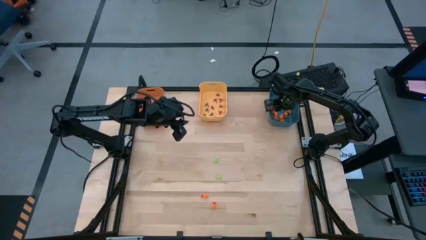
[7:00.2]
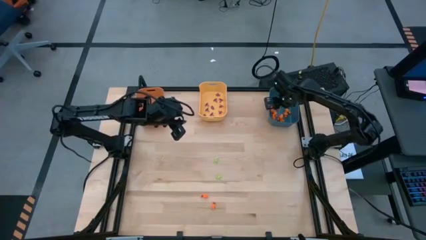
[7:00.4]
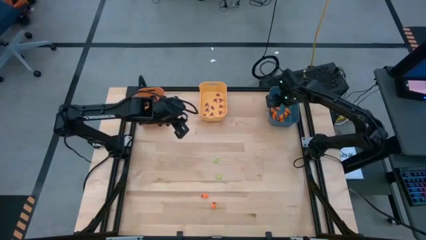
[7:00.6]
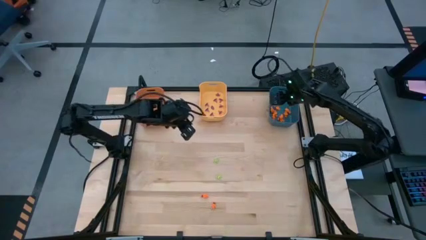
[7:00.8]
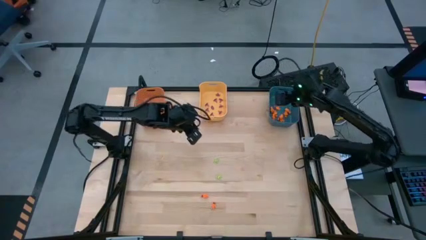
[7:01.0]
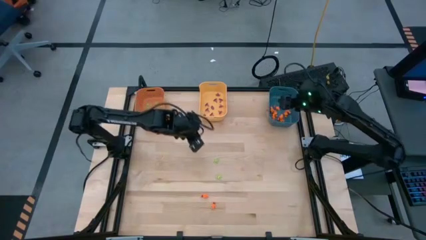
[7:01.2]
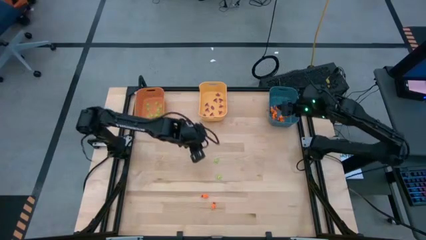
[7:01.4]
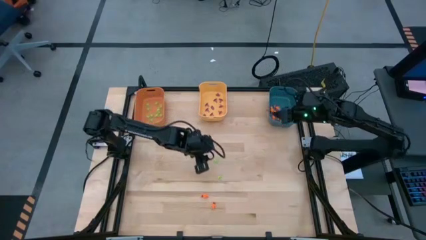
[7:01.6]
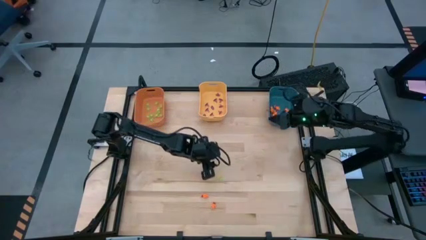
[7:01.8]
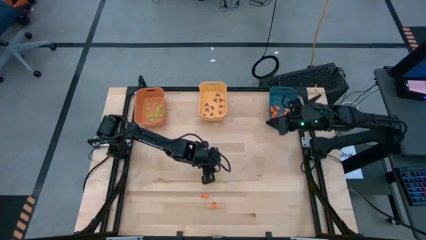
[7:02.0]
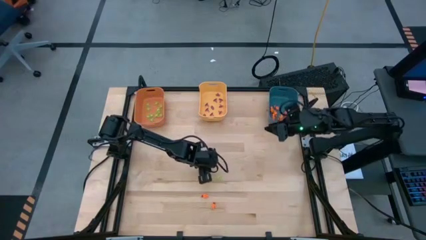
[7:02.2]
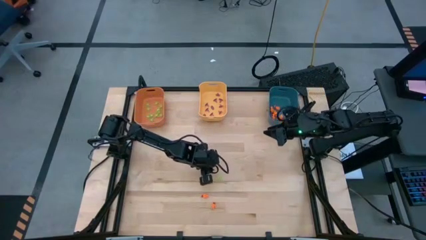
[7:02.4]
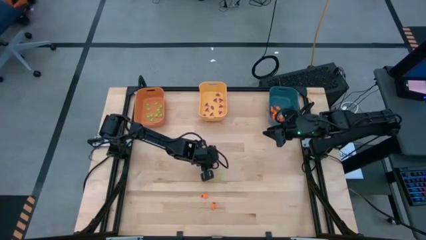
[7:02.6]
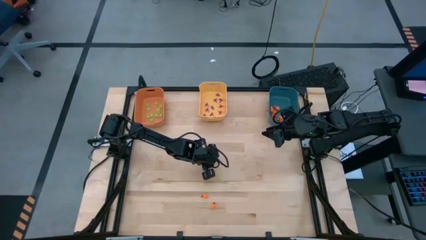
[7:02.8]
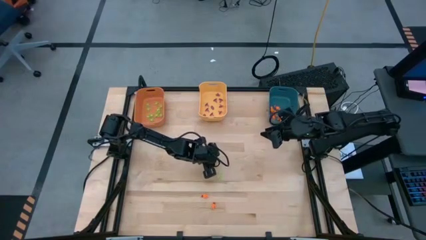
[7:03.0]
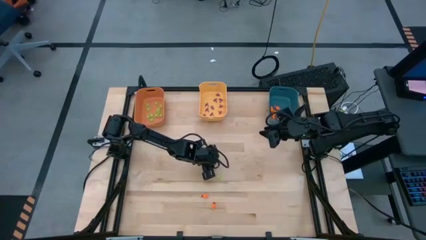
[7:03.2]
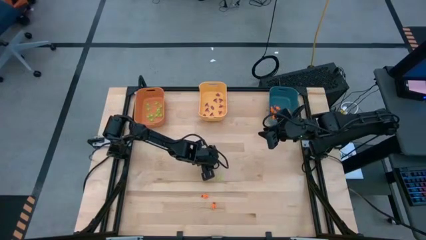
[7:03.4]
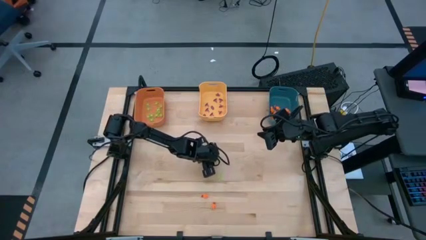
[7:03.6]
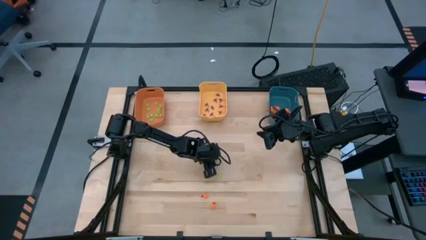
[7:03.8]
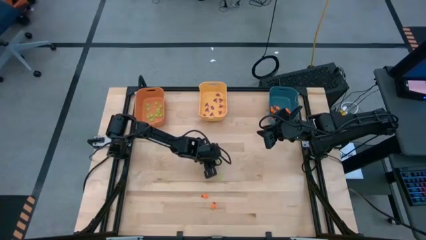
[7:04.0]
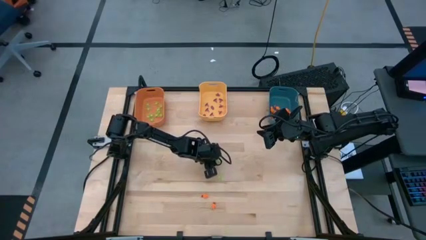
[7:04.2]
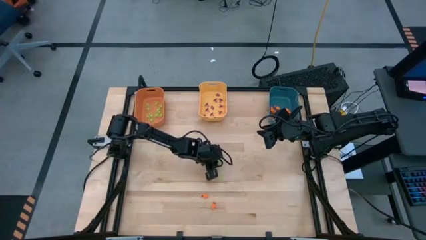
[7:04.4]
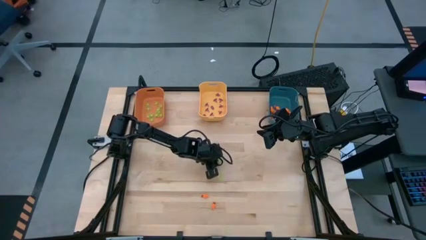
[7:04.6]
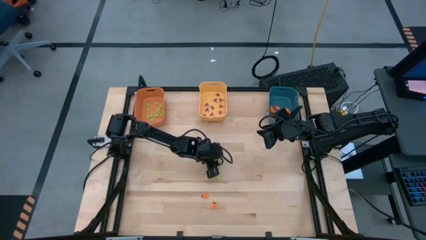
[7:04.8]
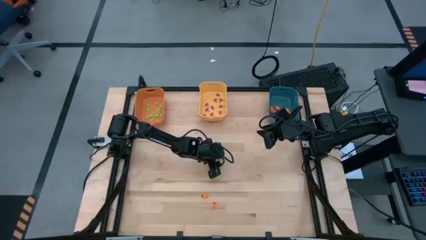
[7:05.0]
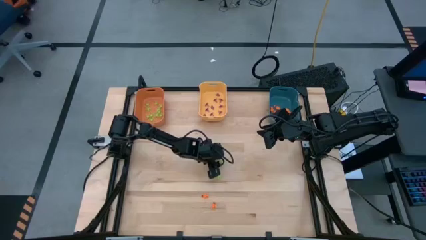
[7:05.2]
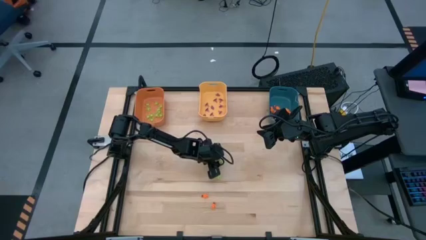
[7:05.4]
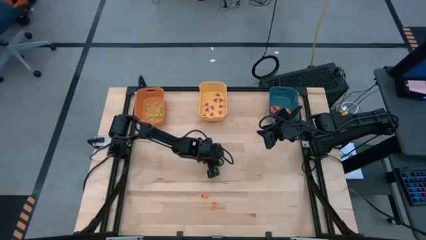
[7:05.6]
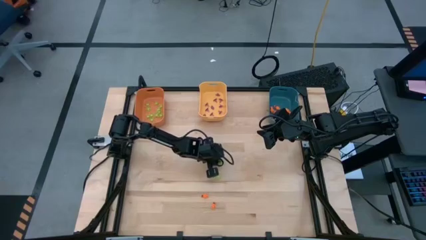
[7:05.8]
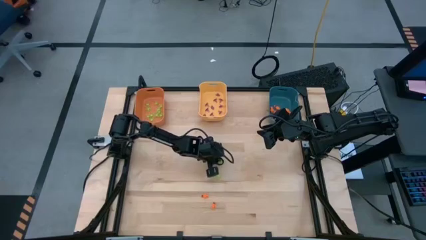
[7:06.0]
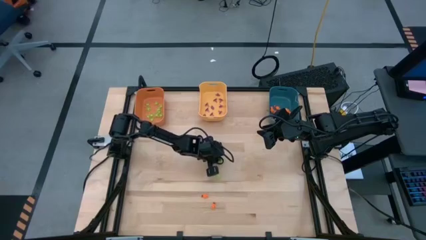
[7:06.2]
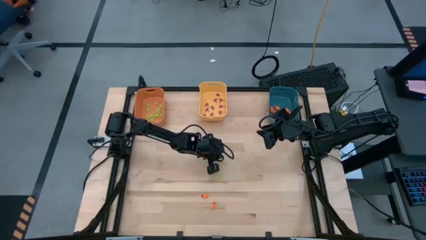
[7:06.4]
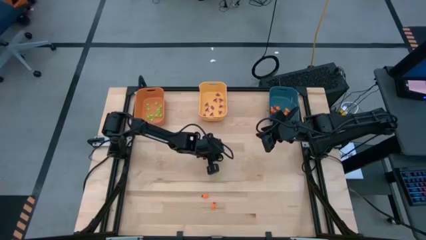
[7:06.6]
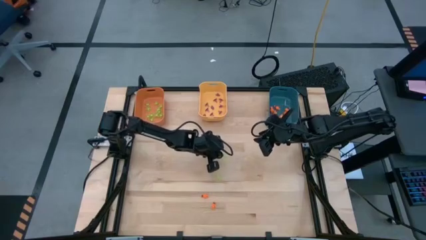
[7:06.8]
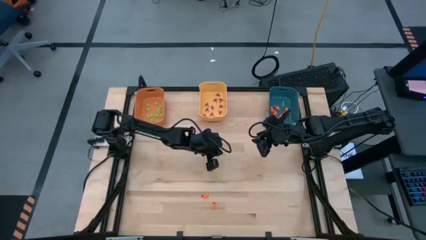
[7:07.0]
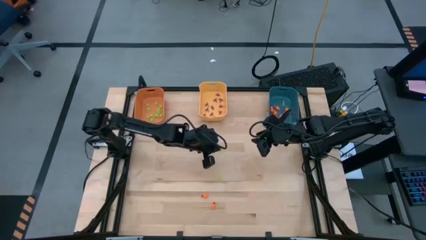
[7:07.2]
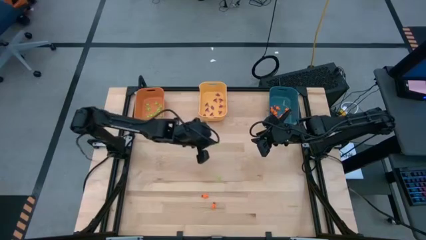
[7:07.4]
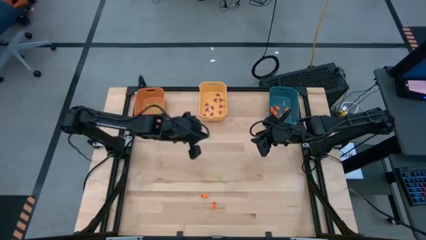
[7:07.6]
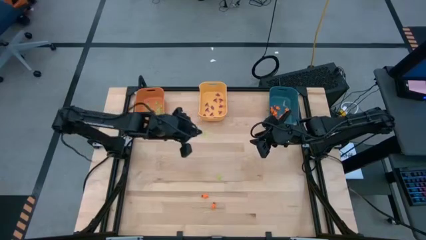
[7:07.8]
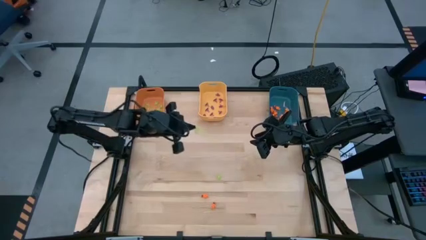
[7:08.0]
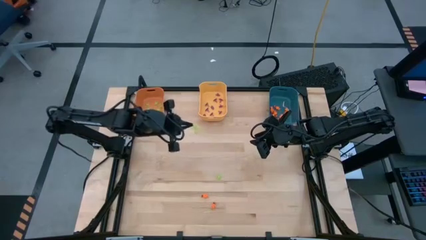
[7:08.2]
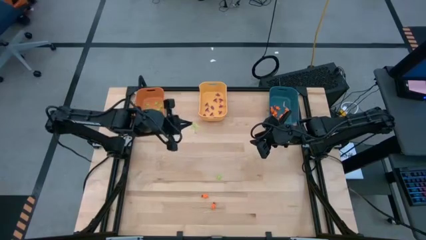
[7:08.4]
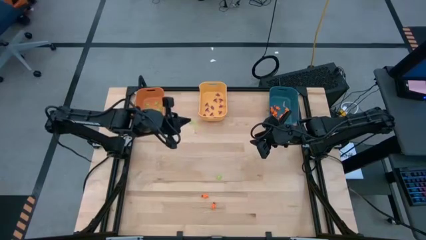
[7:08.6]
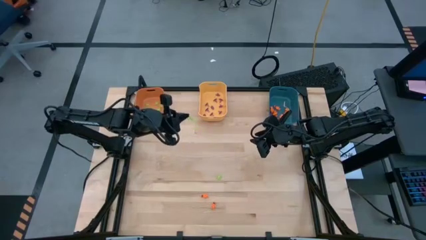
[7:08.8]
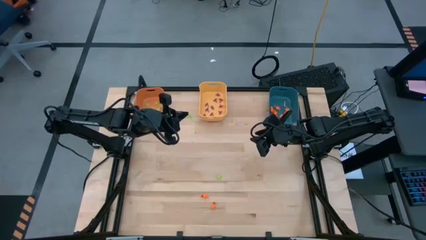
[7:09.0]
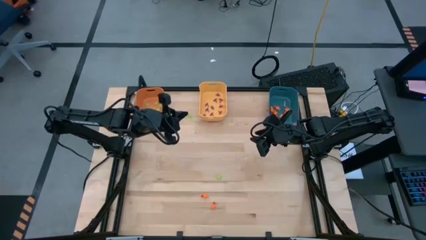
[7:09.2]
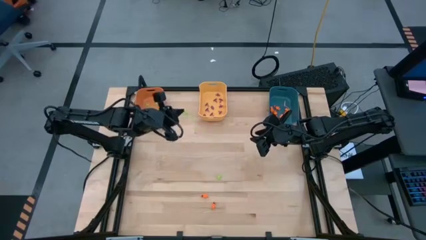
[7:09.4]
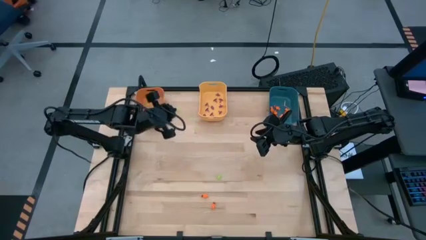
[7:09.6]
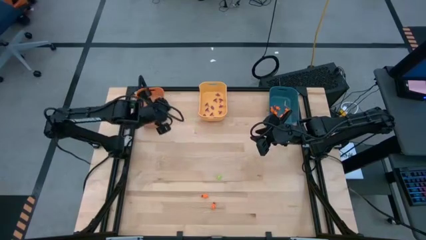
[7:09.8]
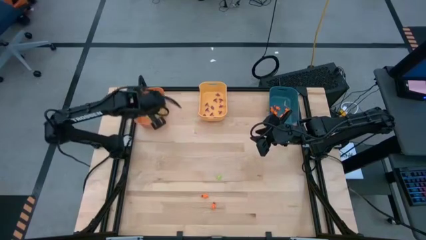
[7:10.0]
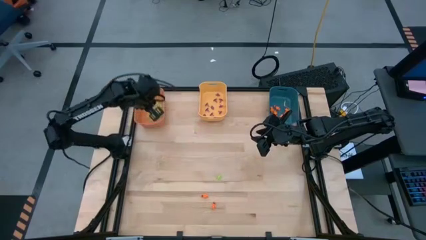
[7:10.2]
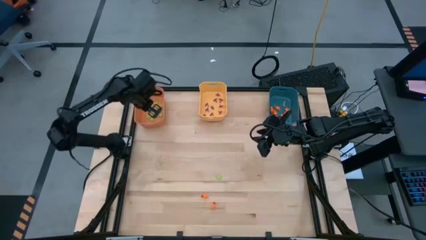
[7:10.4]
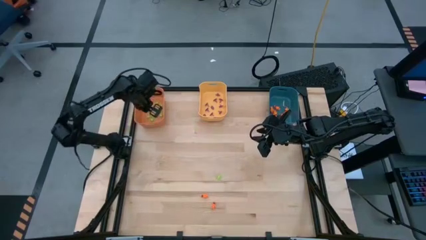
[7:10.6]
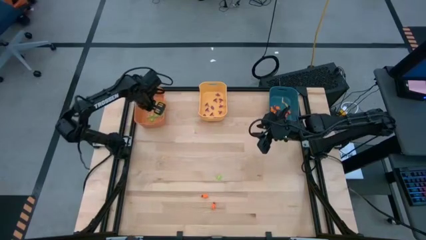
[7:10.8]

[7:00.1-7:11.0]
Task: Sort Halloween decoration
Put the green spider toy into the orange bin

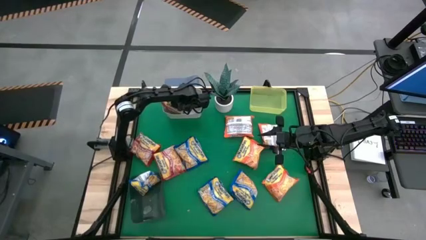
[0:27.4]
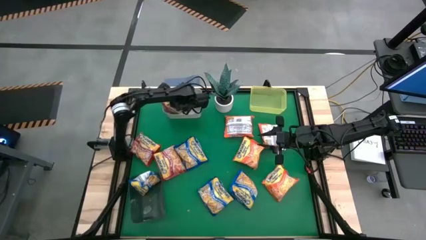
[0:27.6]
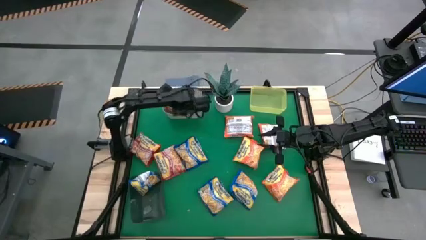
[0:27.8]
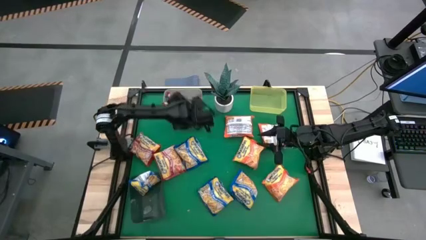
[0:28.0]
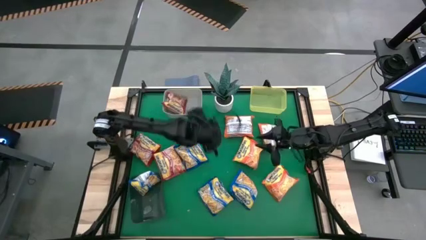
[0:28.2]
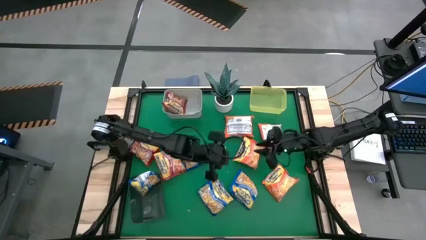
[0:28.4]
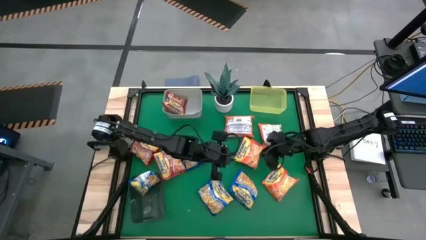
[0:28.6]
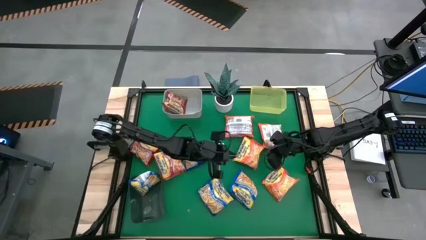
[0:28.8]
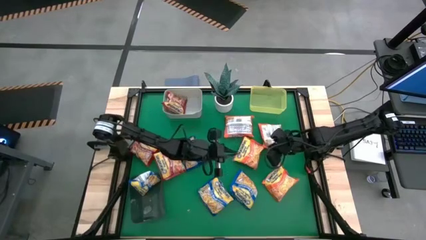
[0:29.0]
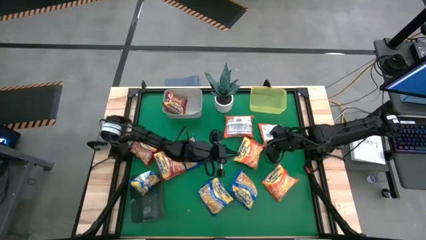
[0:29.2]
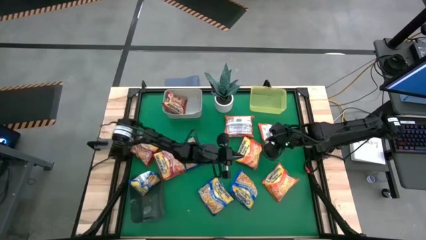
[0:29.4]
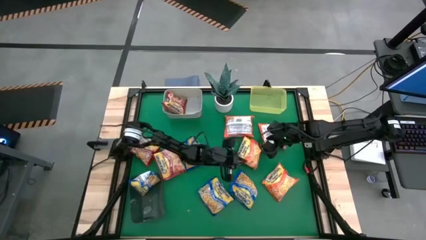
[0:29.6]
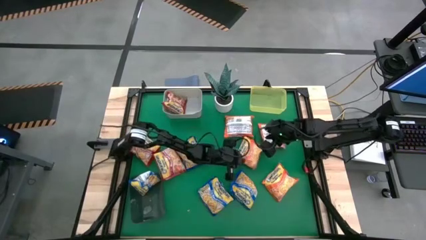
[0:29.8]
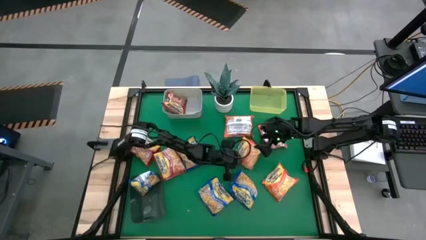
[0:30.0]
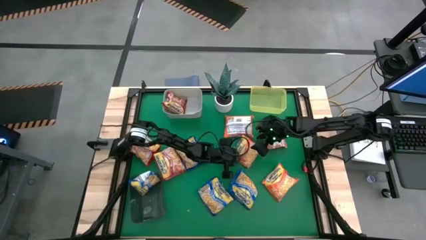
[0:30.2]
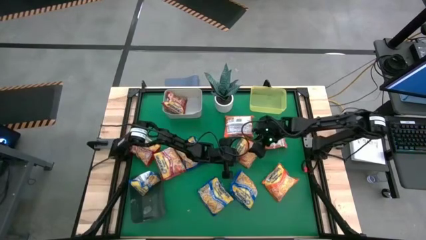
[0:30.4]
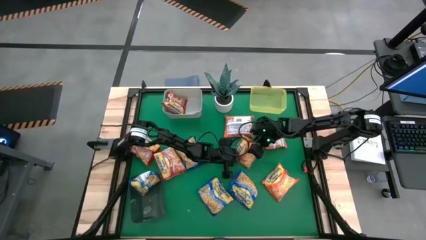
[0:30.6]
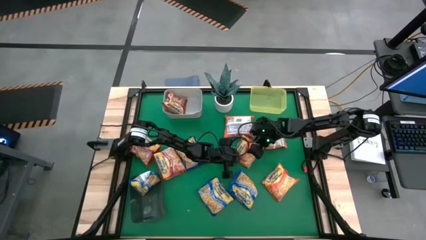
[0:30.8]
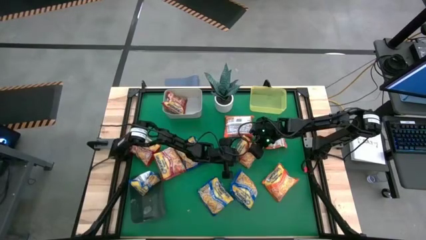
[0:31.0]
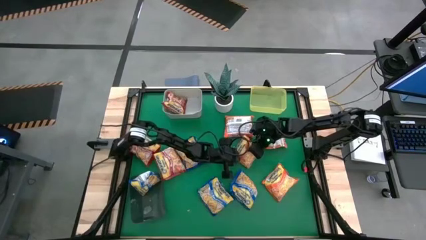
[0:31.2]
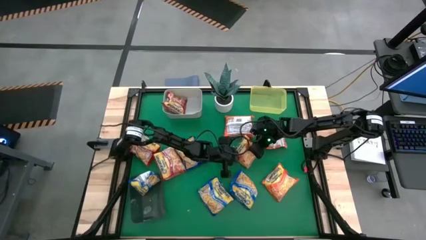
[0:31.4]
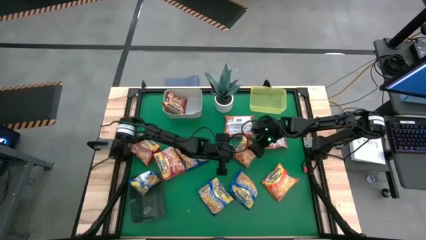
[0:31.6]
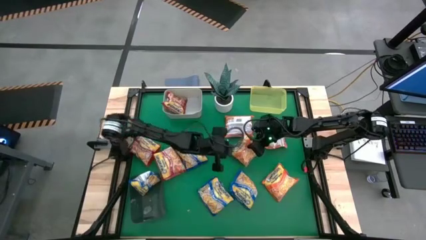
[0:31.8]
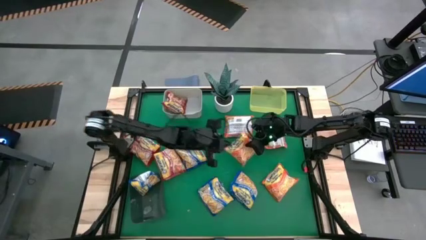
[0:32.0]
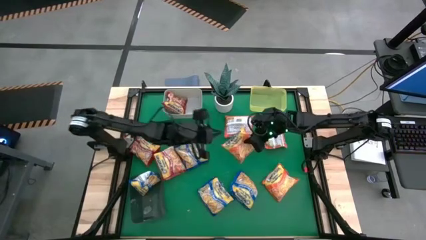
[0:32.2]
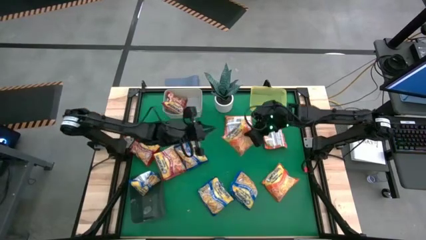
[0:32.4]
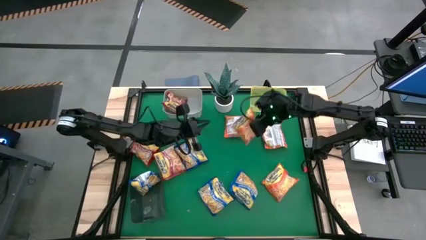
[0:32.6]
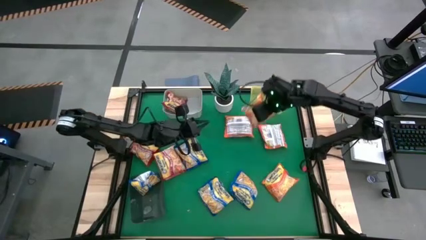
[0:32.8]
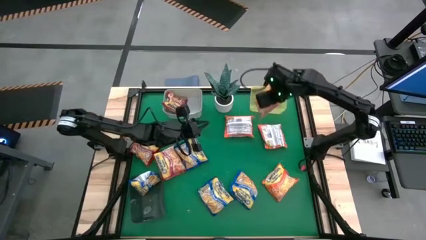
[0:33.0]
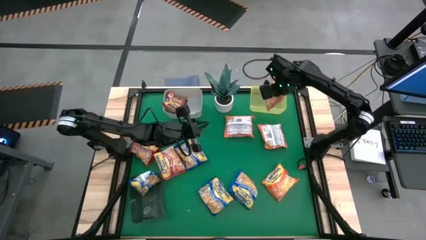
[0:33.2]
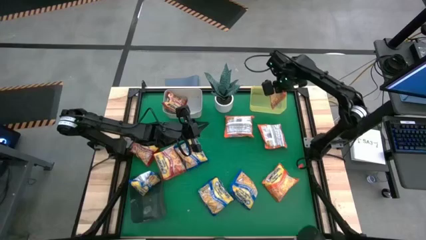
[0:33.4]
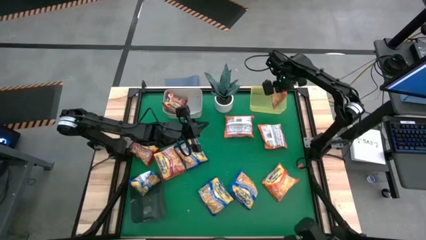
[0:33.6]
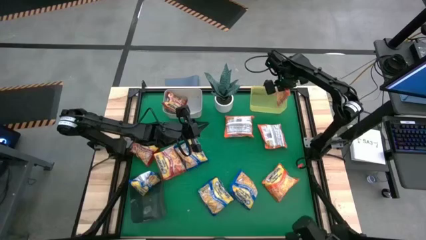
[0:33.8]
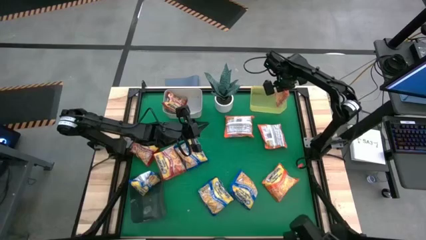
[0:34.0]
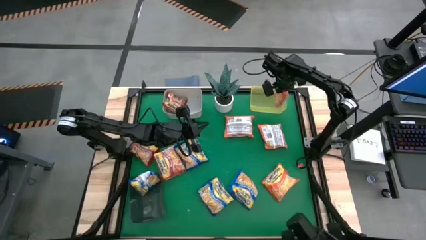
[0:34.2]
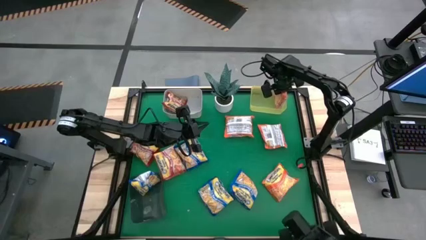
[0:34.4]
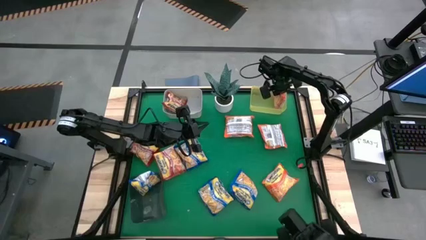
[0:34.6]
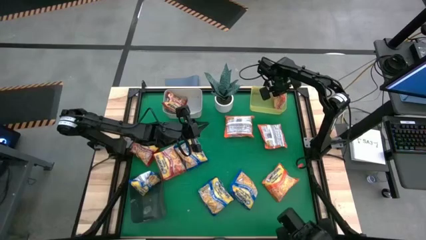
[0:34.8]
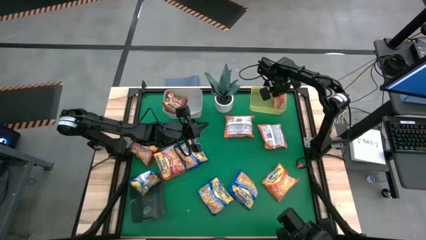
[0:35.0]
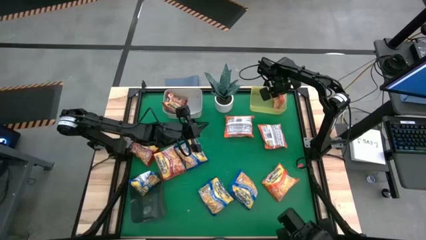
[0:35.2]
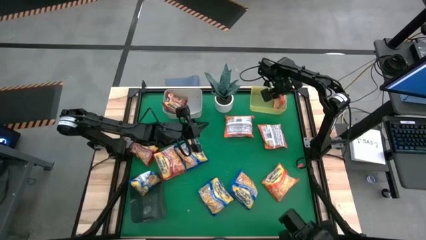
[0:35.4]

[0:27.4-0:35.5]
Task: Sort Maruchan noodles
Put the center orange noodle pack into the yellow bin
